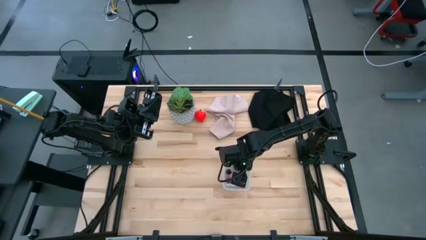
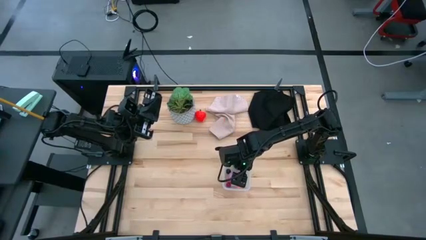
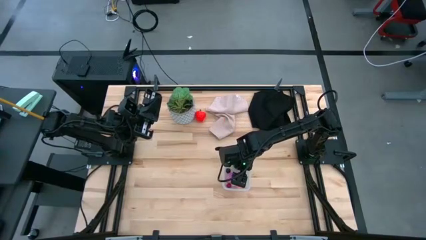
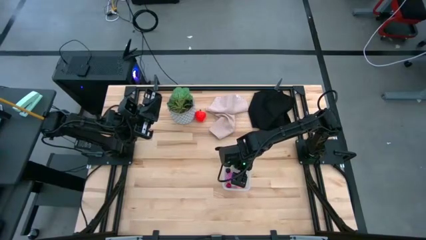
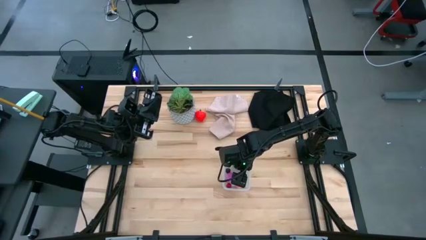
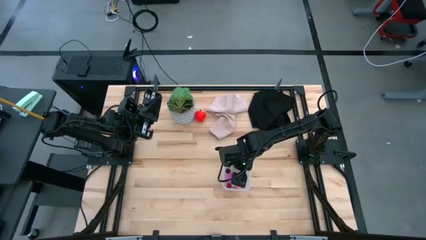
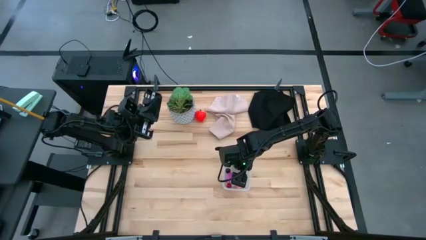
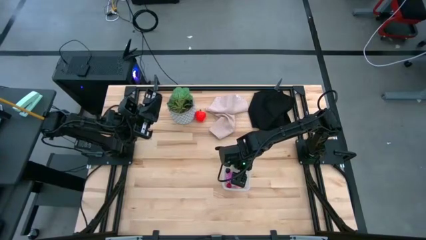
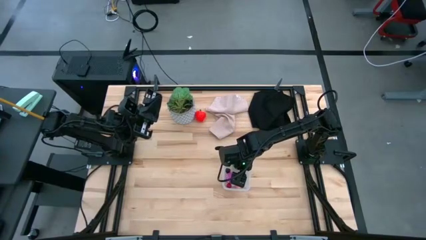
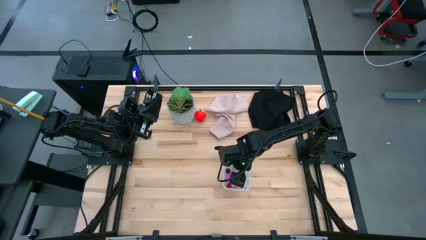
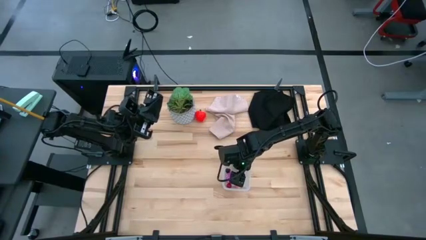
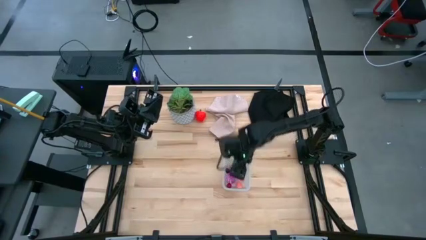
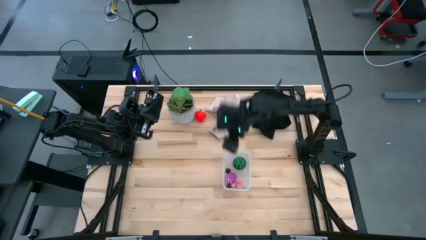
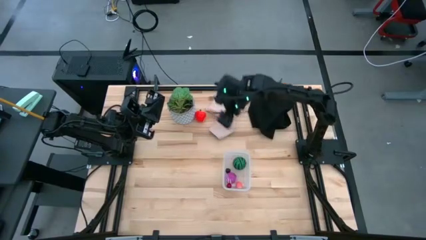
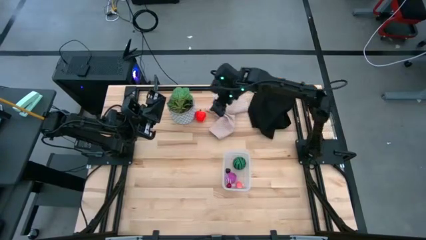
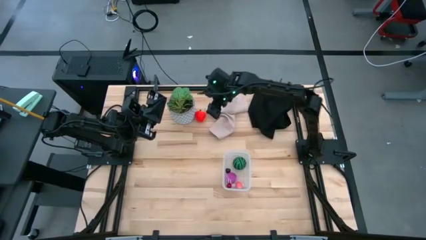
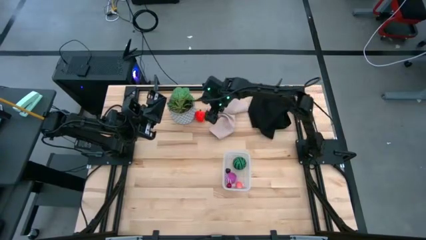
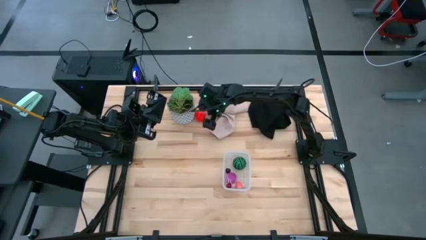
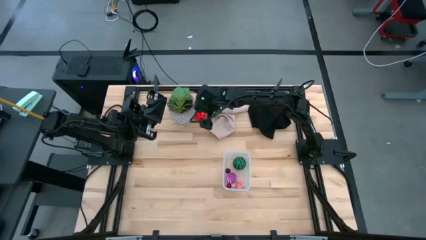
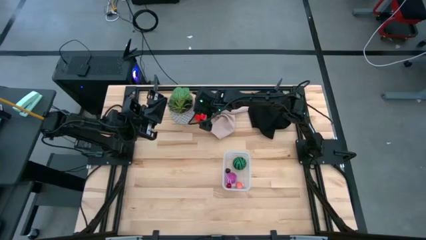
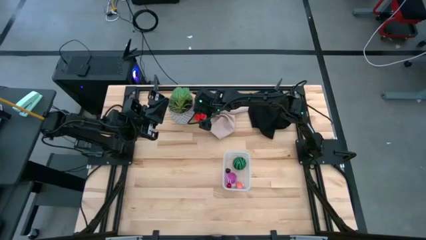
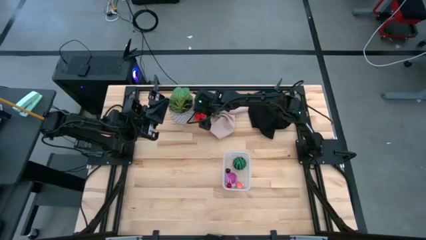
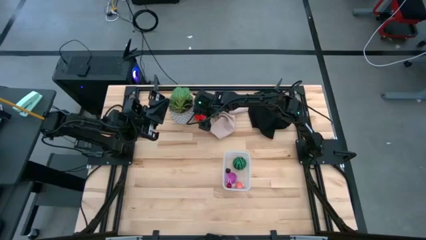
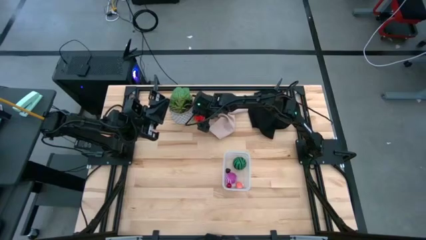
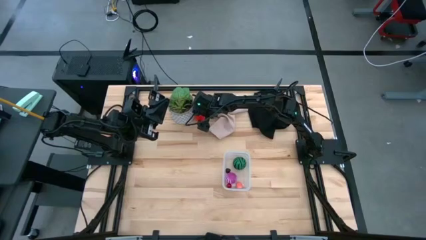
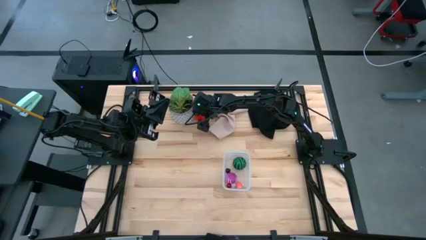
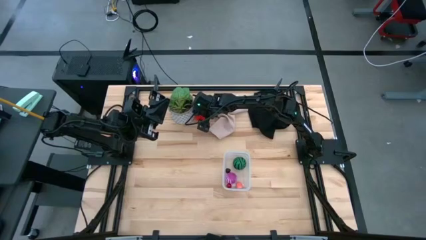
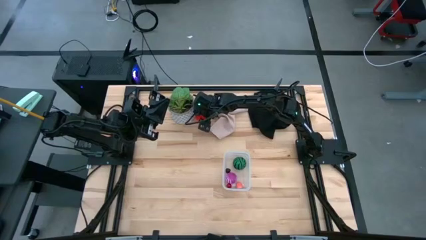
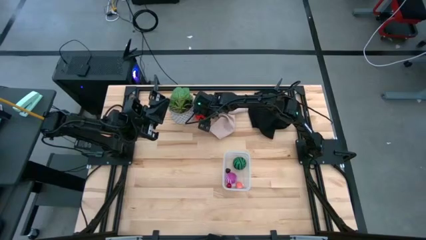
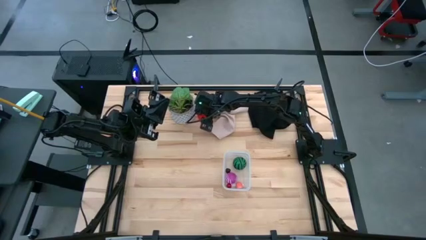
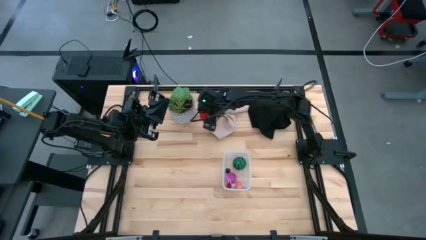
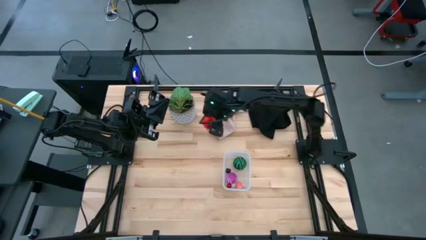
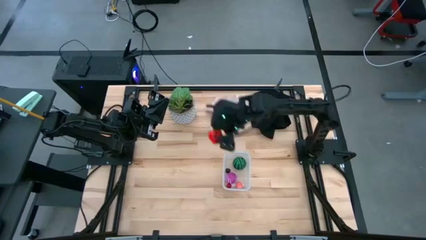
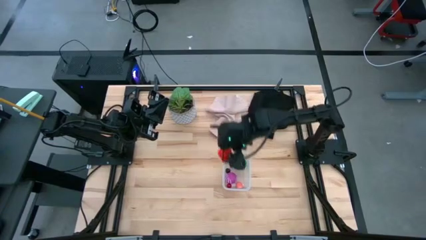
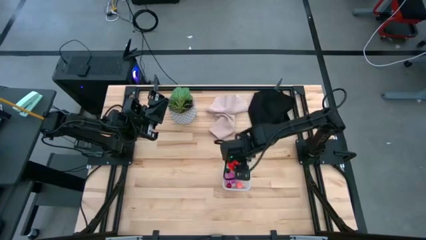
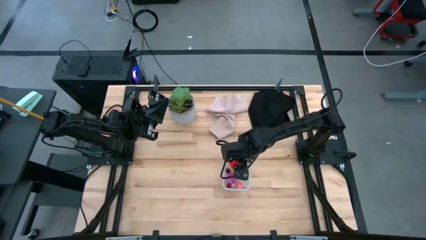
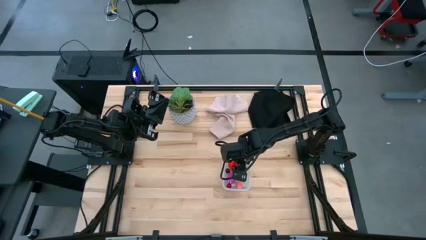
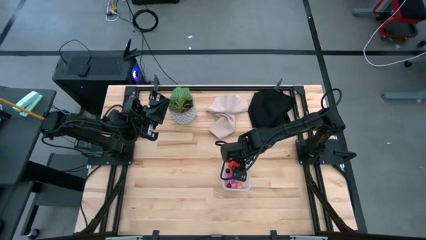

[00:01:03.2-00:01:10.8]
Task: Pick and placing Produce into tupperware
Put the red apple into the transparent bin

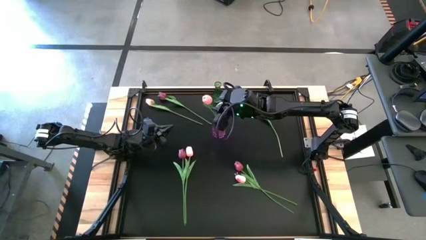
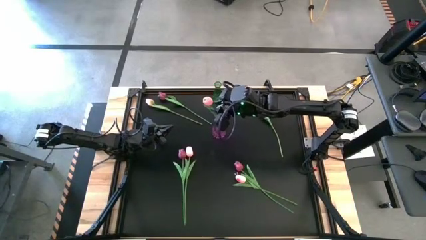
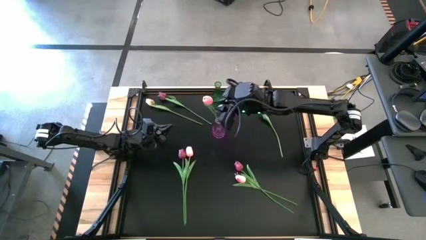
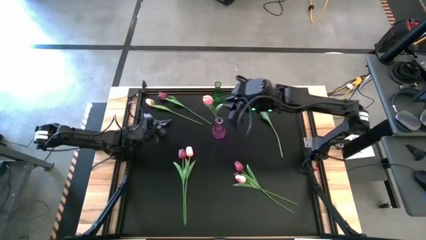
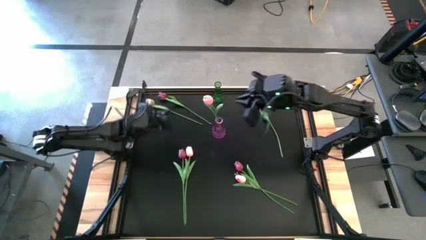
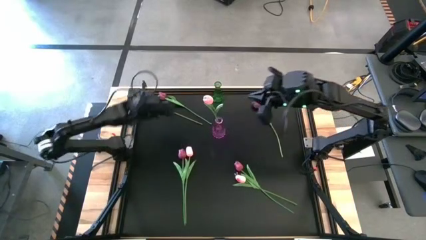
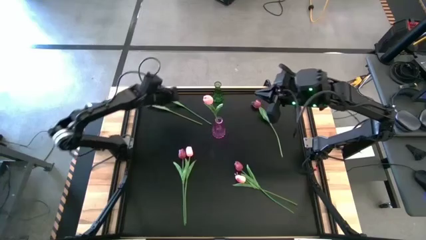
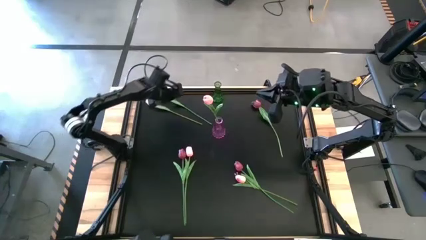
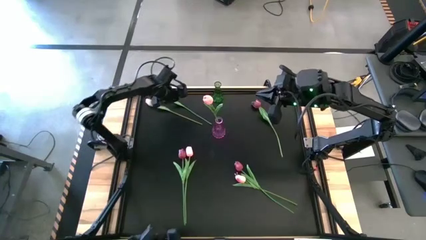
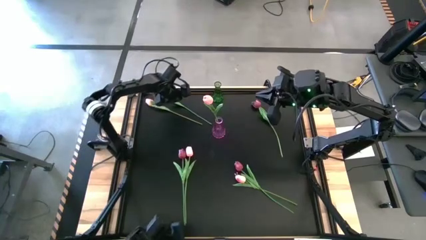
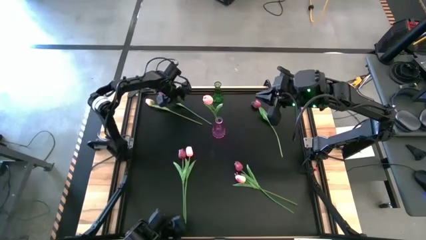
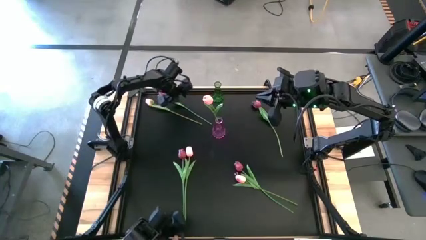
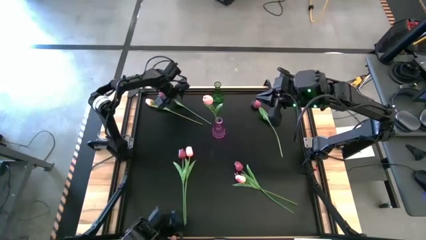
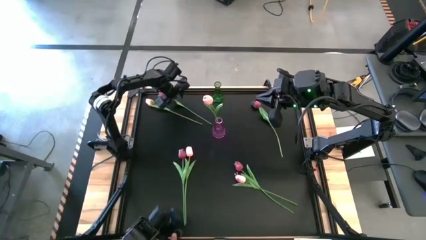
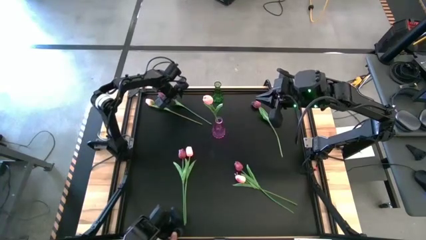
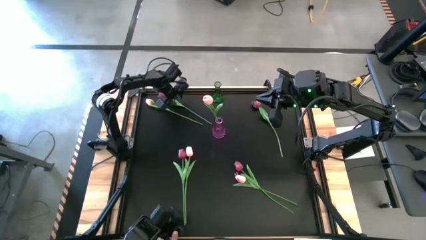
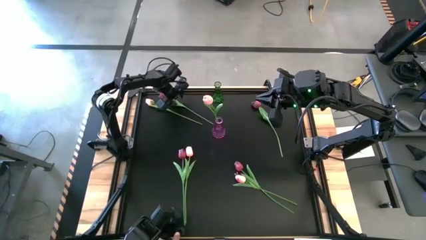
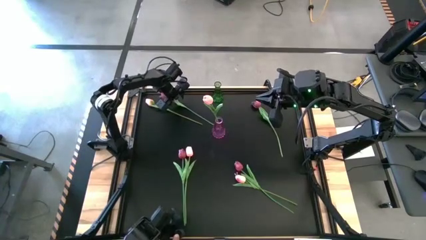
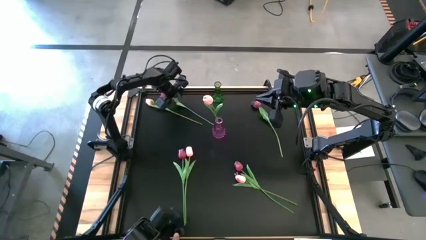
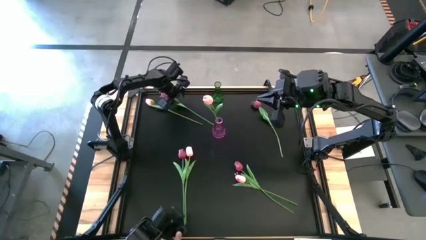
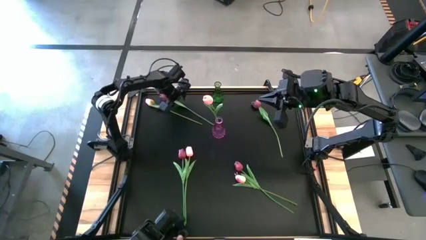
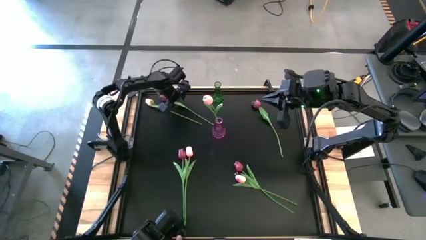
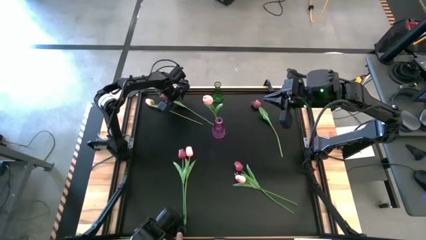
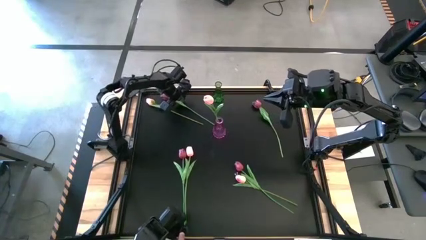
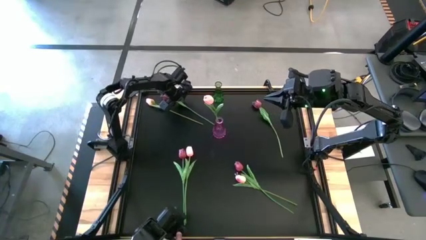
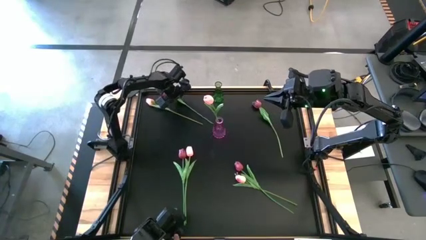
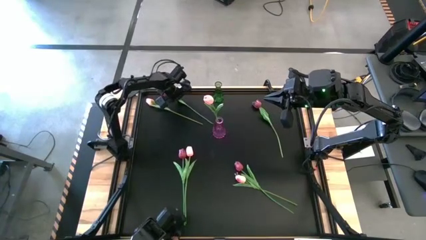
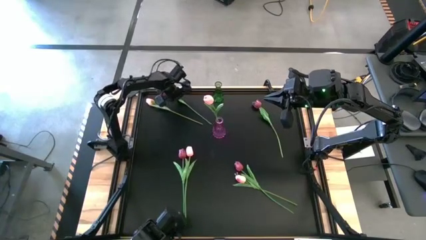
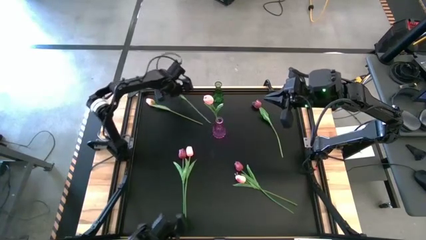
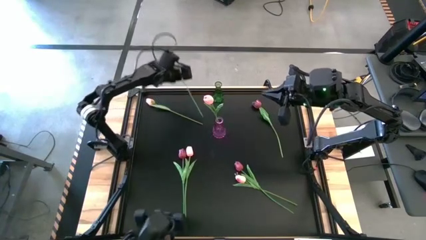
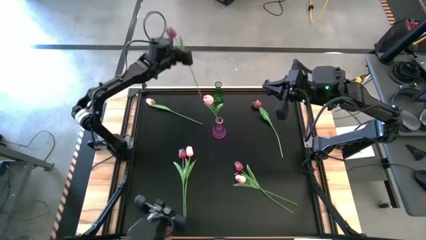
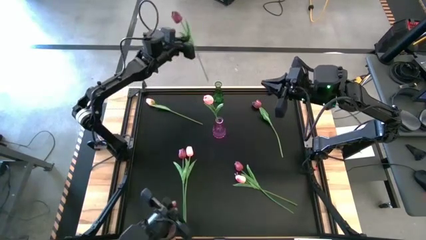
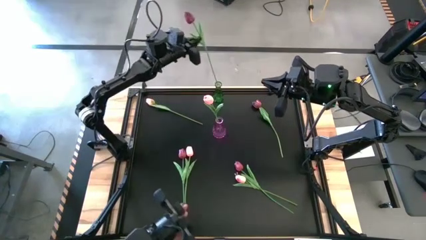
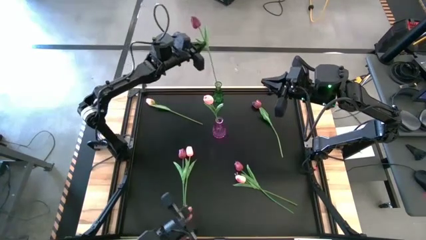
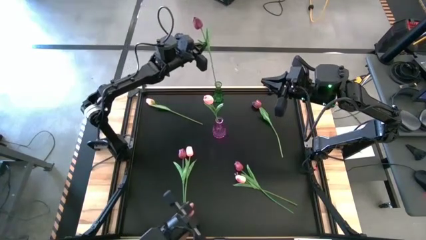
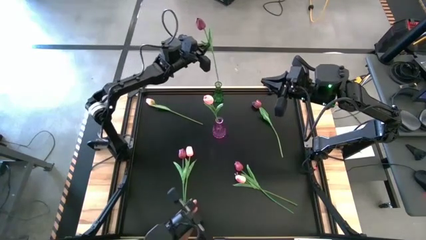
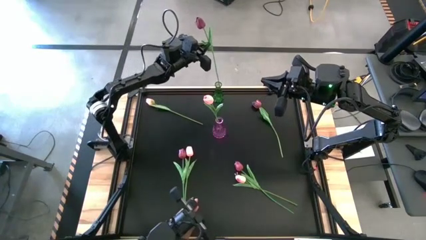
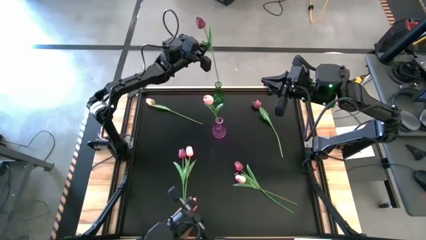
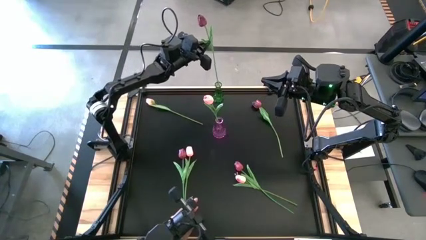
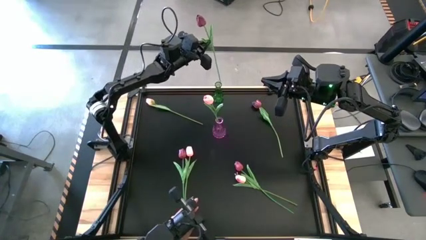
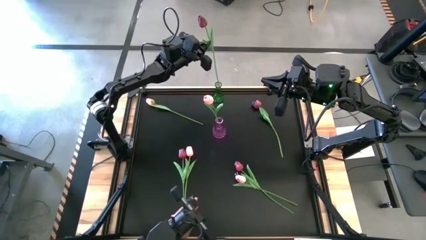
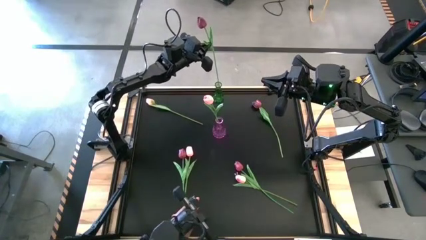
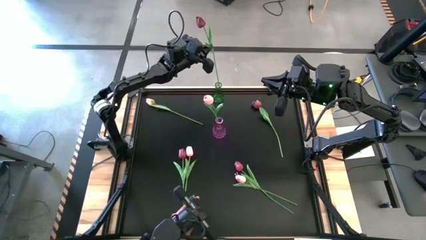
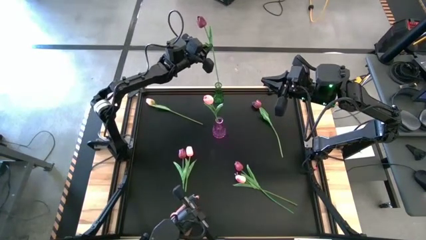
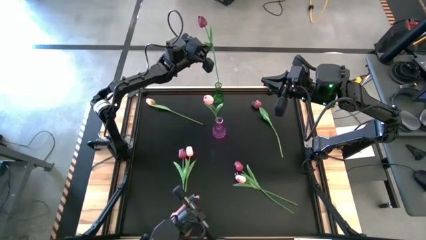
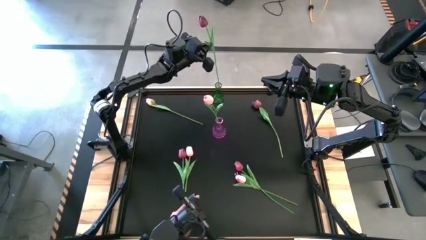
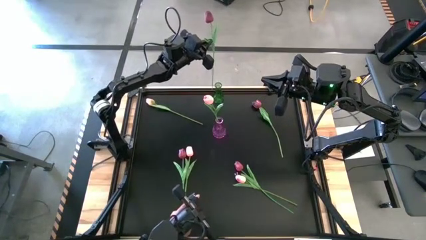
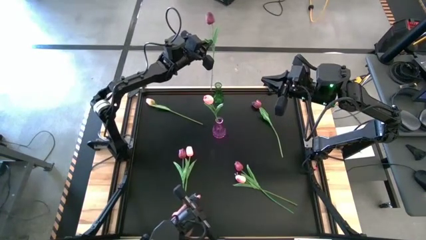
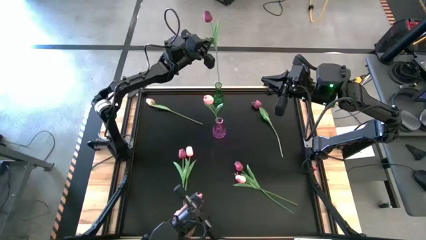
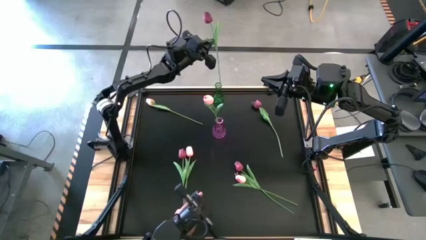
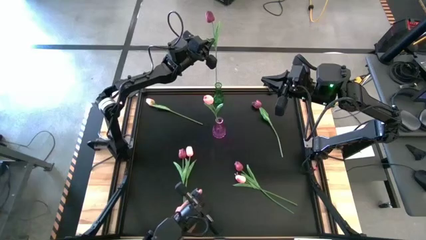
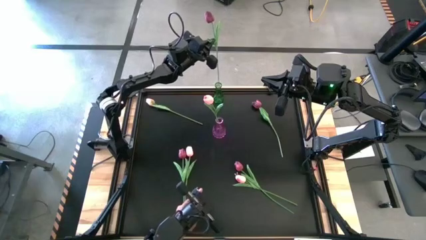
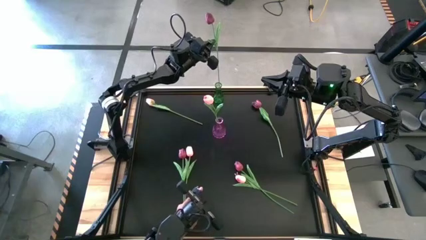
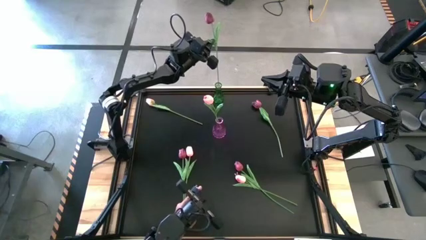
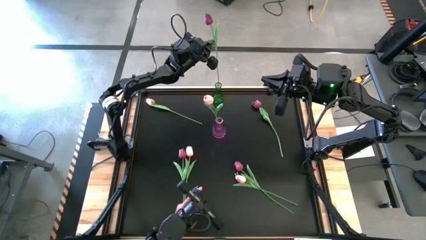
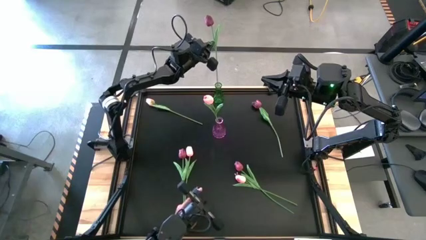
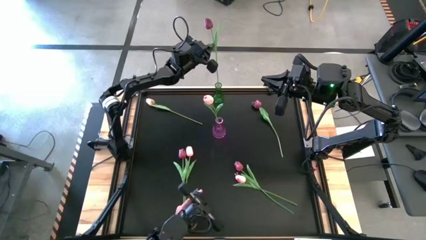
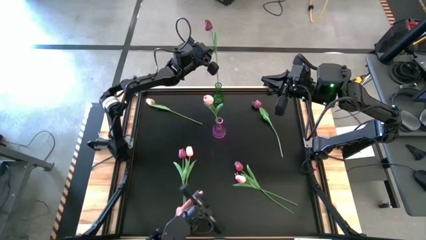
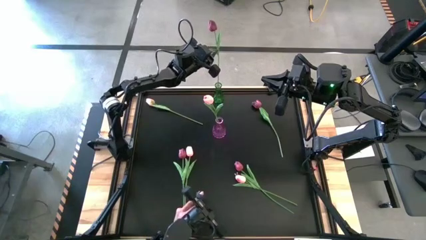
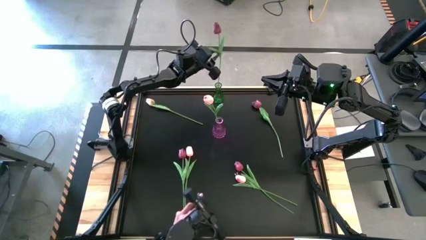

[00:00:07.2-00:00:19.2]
Task: Sort flowers into vase by color
Put the top left red tulip into the green vase
